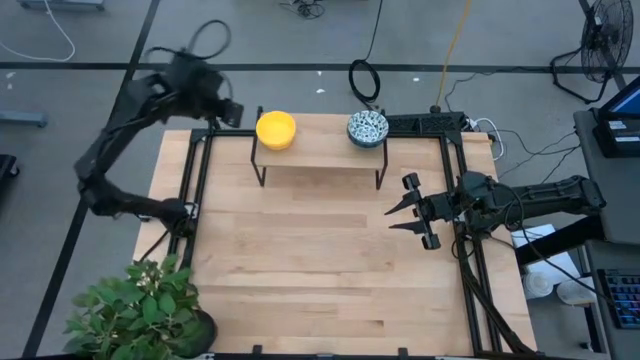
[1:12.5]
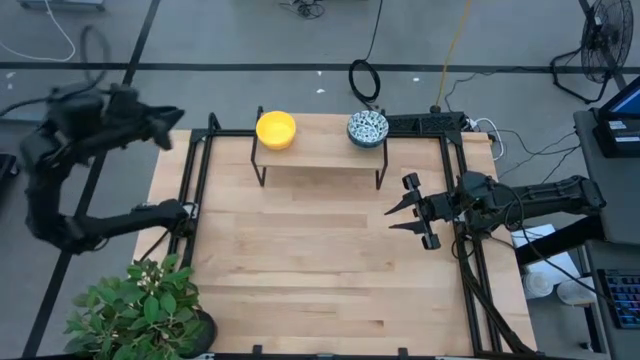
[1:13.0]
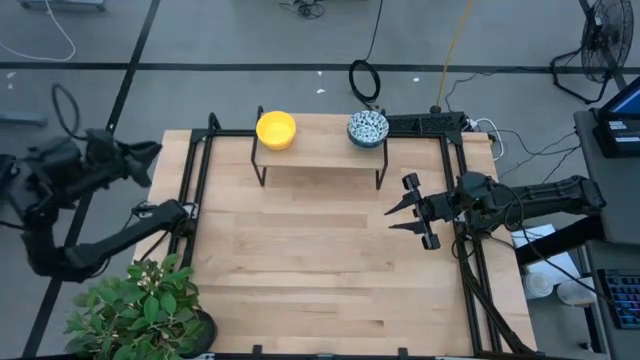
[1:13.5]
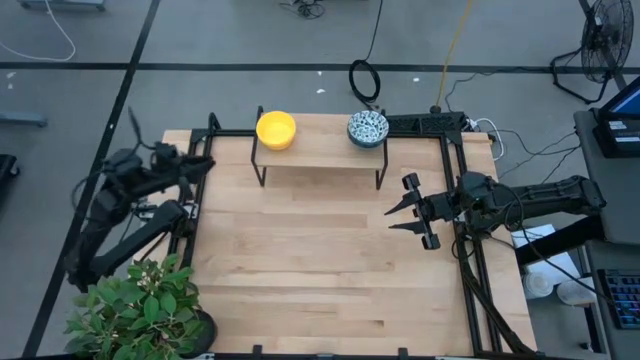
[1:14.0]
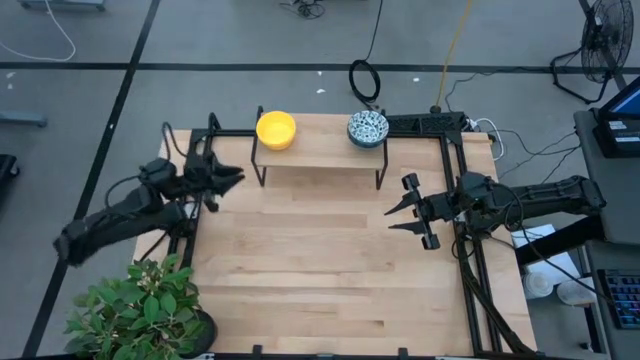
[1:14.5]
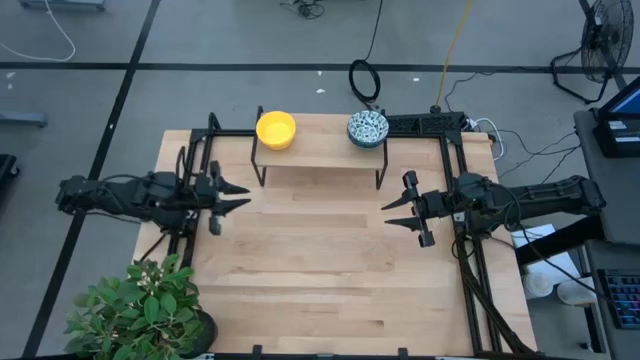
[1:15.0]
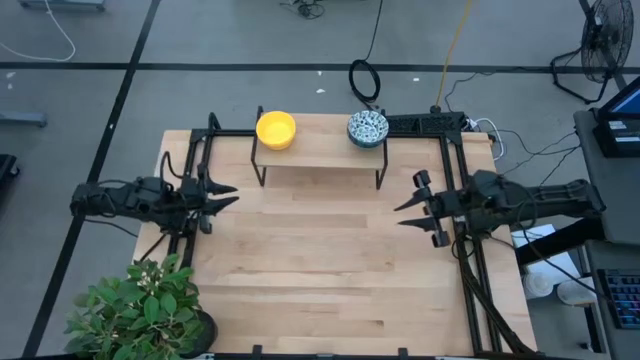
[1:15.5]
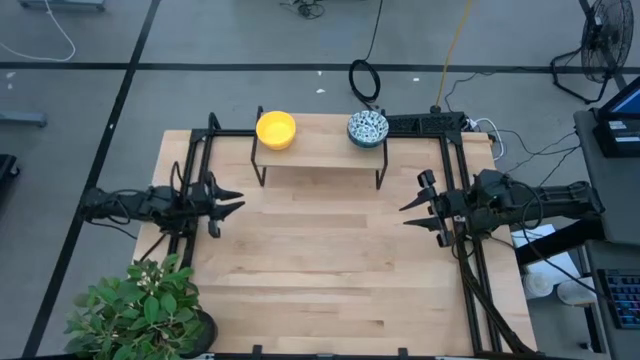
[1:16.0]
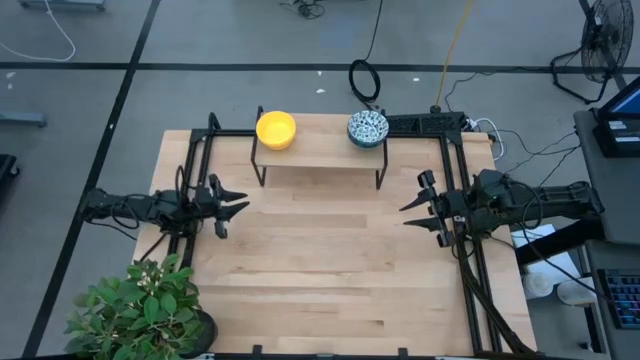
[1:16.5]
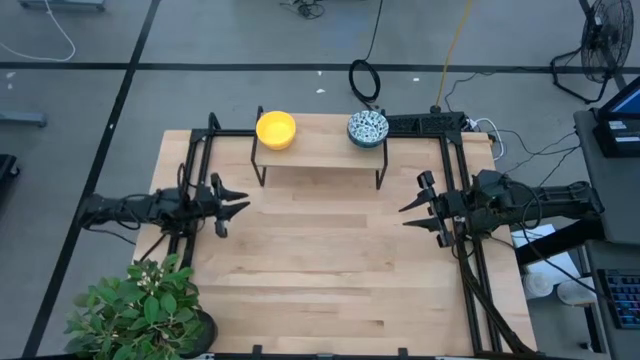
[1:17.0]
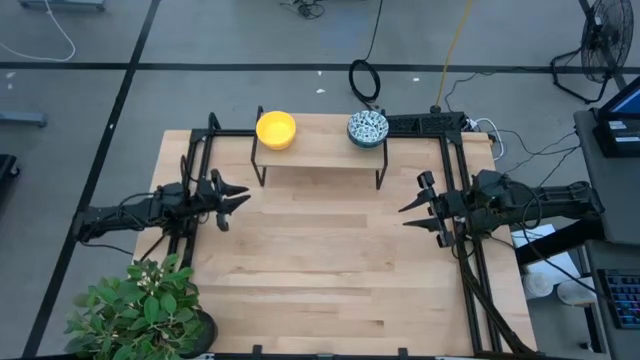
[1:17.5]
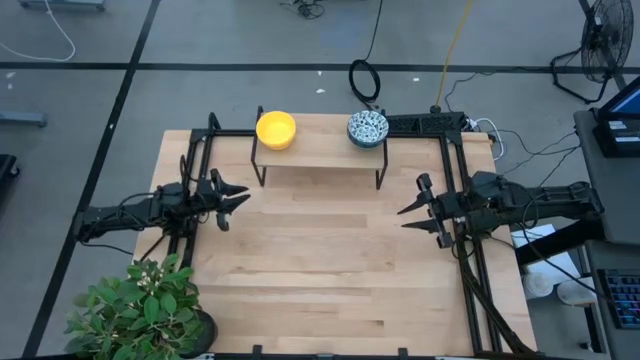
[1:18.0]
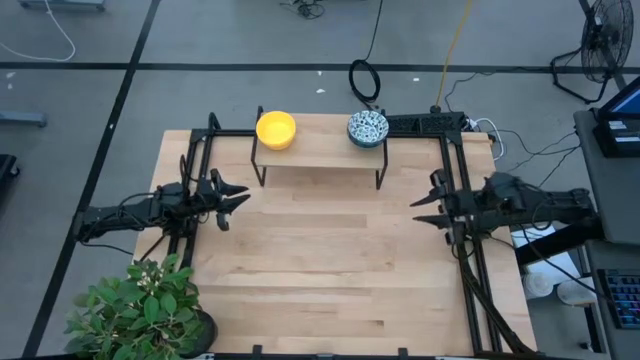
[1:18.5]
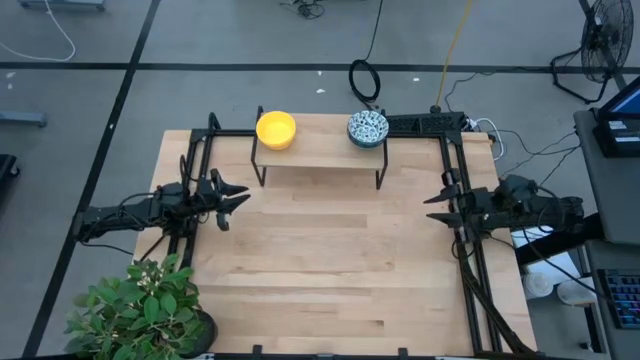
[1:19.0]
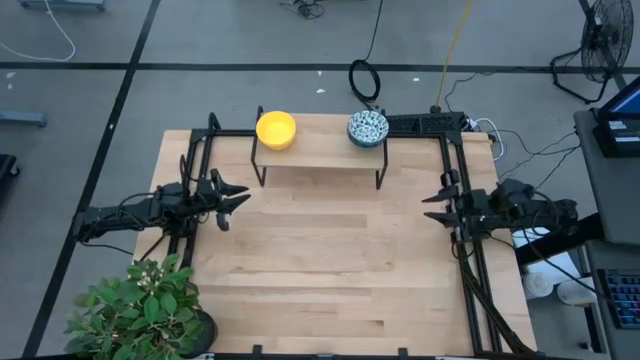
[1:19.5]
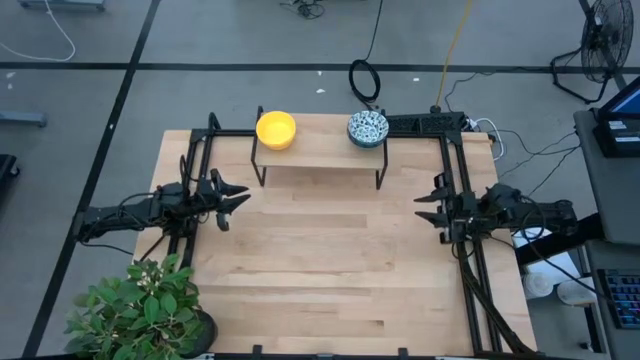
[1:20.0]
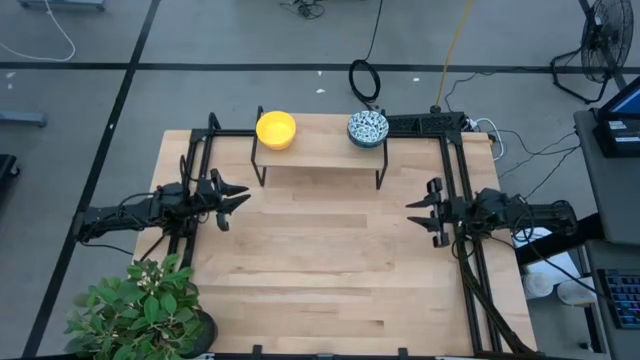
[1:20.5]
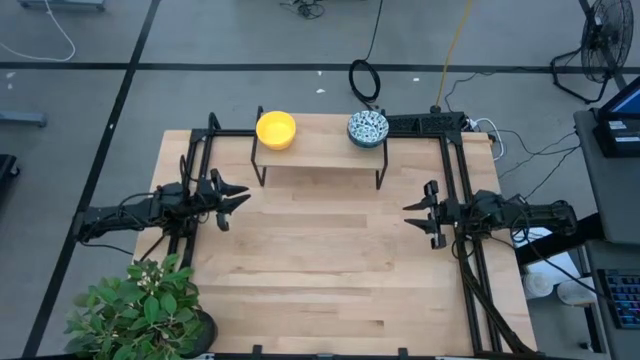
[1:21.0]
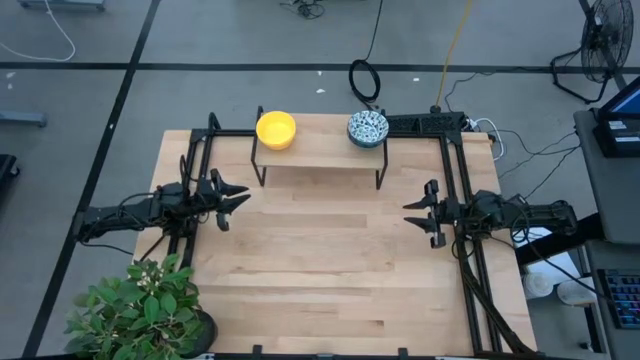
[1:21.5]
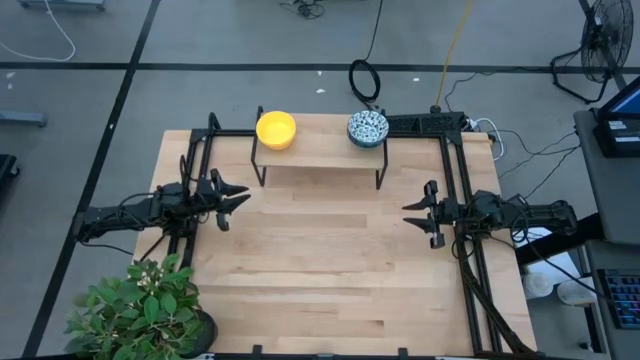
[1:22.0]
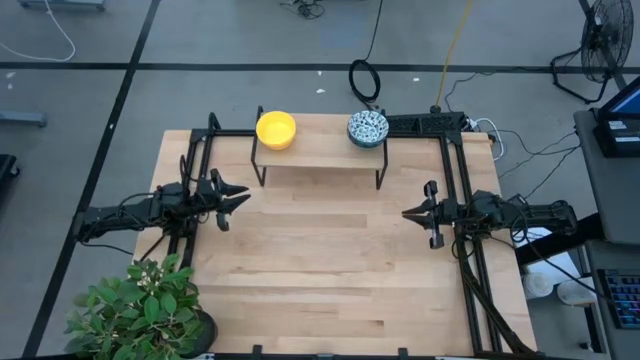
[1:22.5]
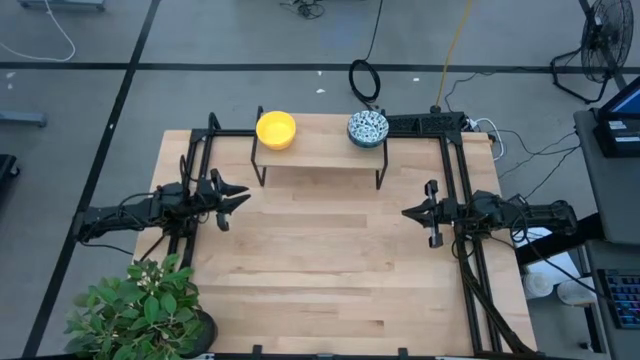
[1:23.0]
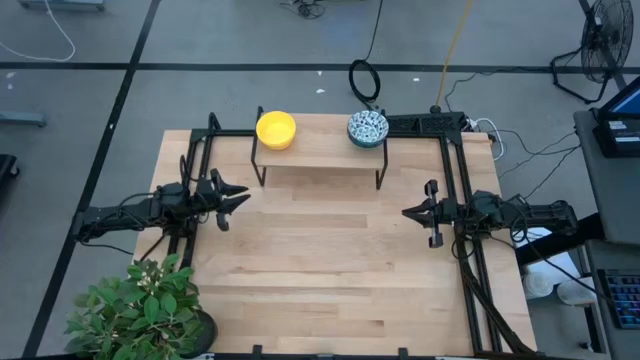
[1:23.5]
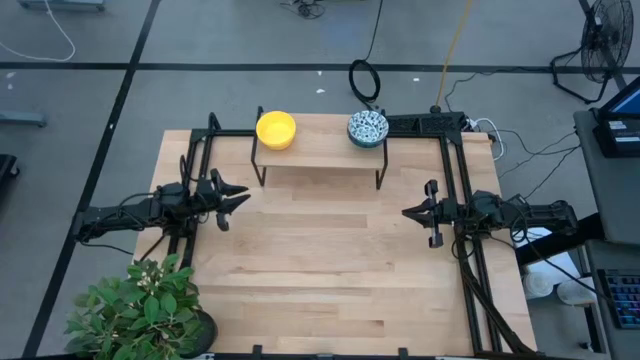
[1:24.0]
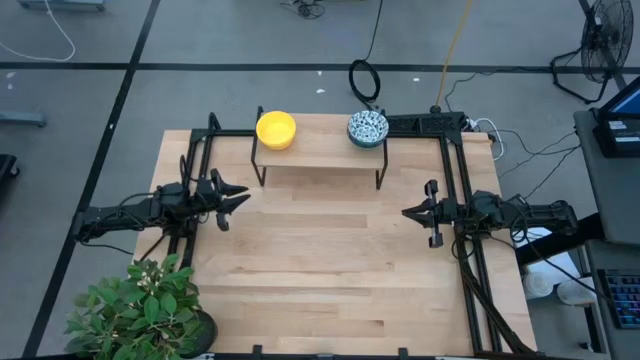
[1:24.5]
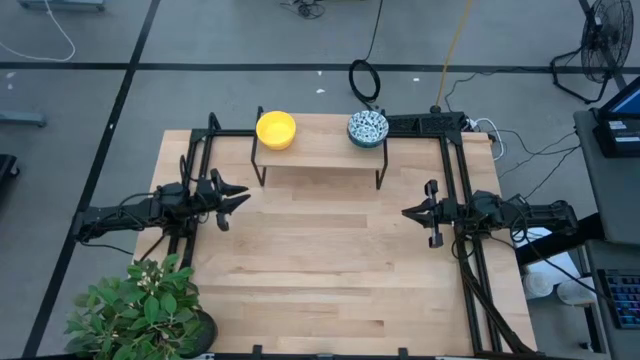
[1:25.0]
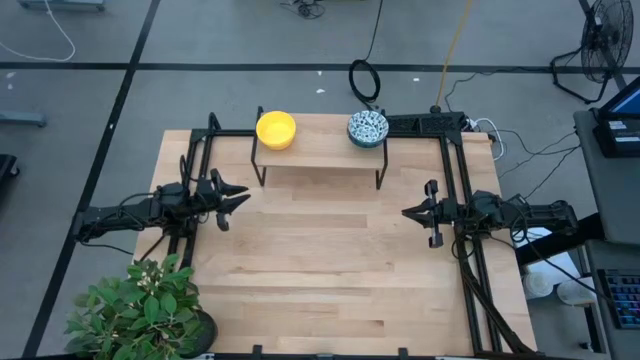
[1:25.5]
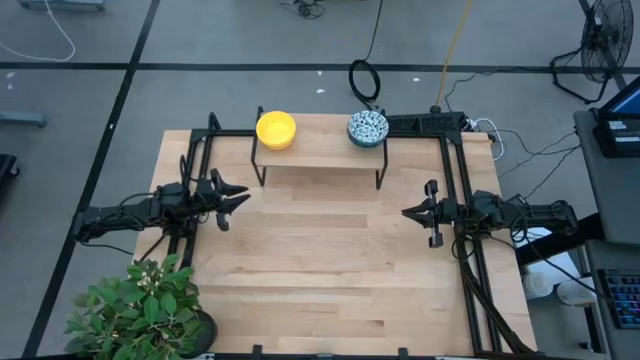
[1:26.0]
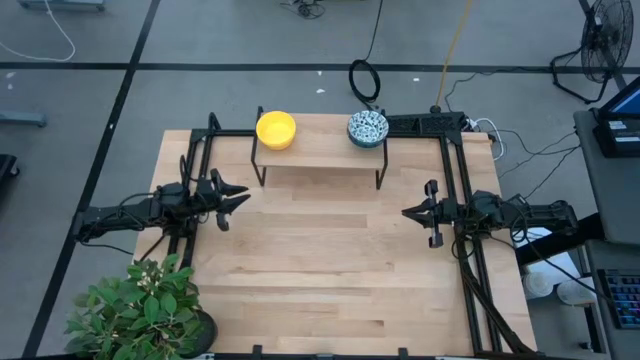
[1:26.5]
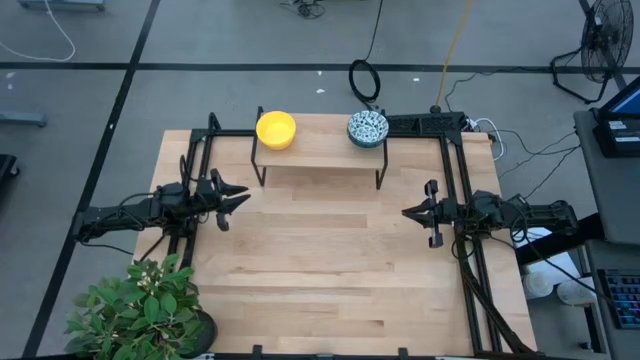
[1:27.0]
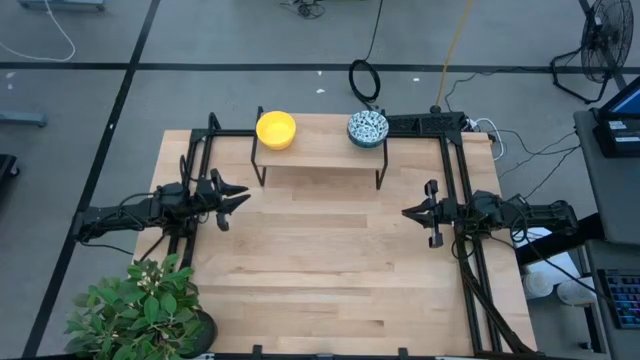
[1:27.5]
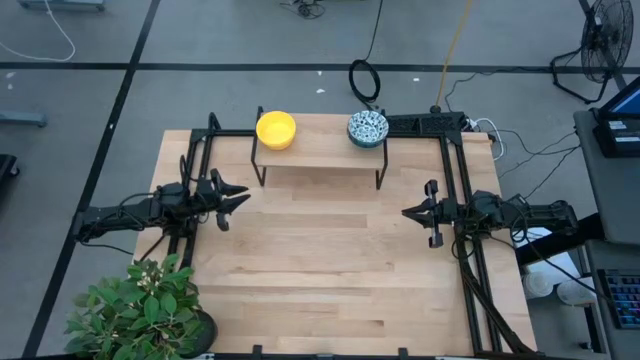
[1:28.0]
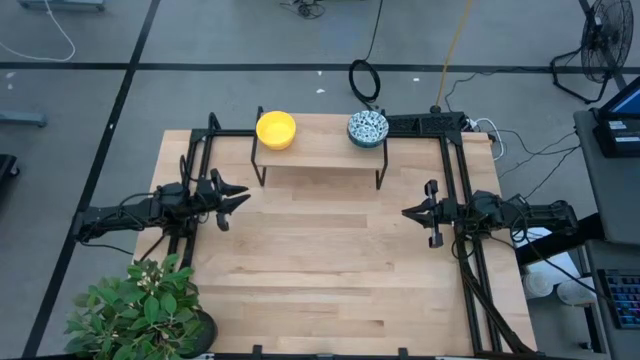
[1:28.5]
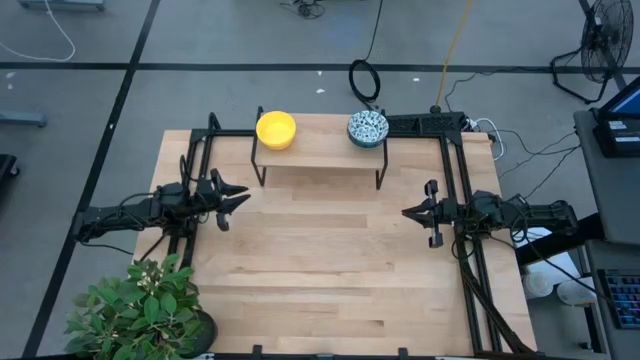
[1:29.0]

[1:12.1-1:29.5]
Task: Pick & Place Mini bowls
Return to Home Position

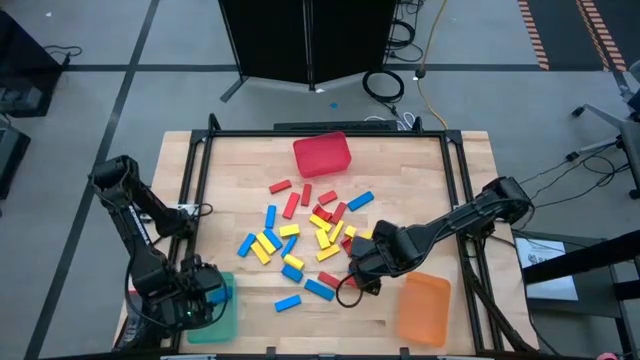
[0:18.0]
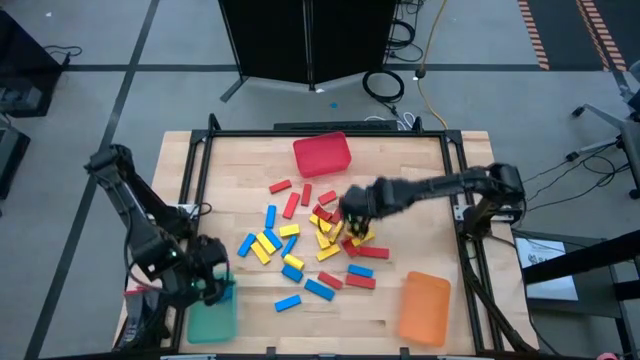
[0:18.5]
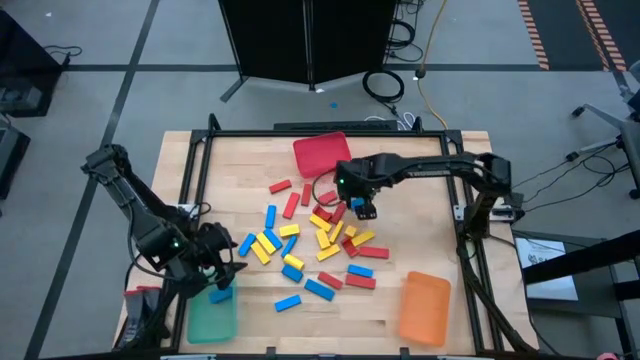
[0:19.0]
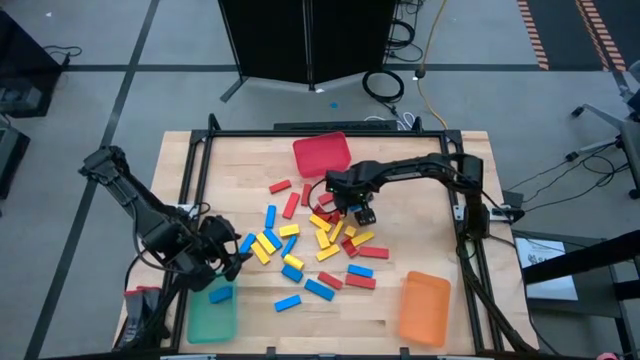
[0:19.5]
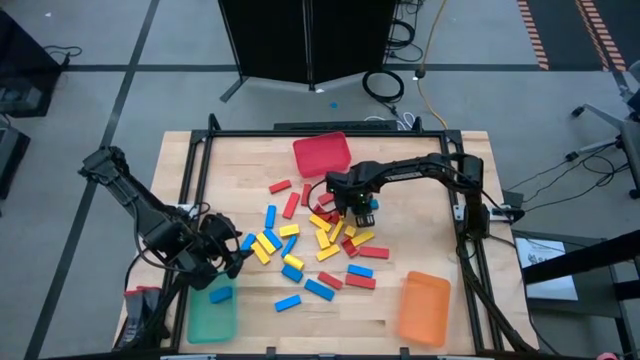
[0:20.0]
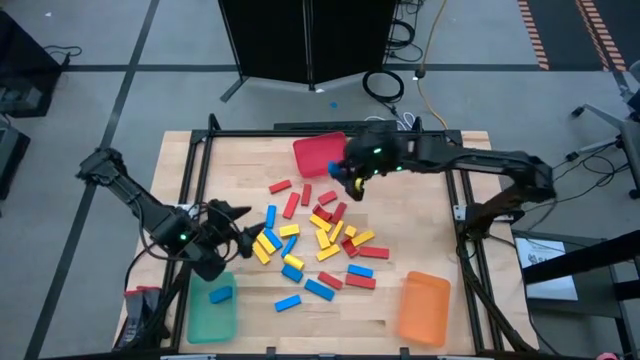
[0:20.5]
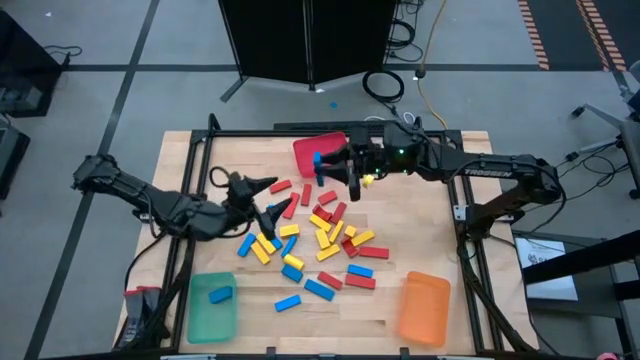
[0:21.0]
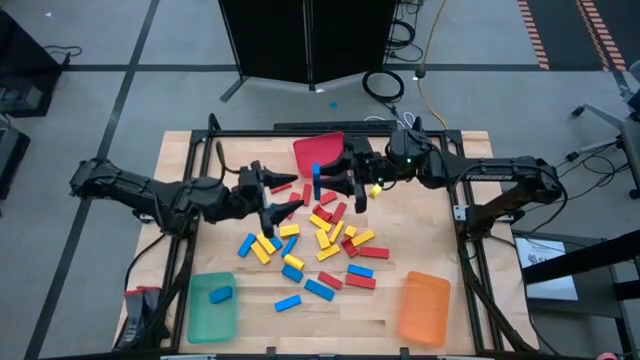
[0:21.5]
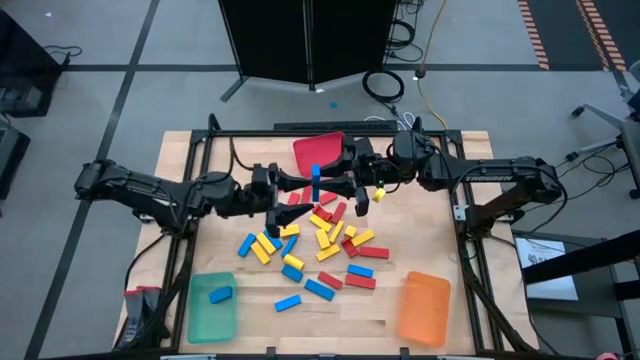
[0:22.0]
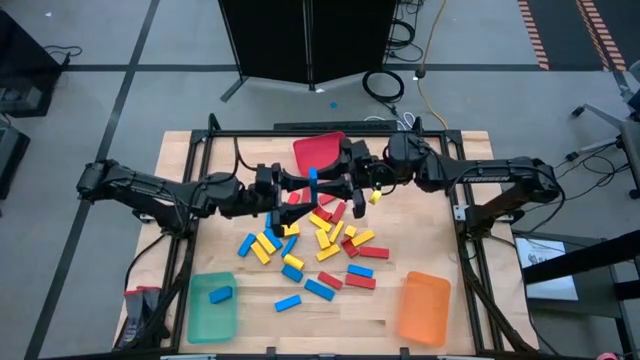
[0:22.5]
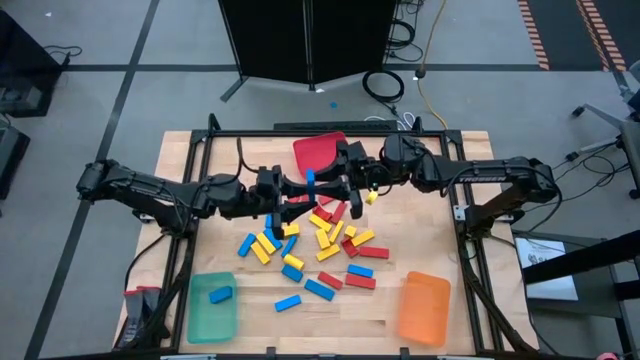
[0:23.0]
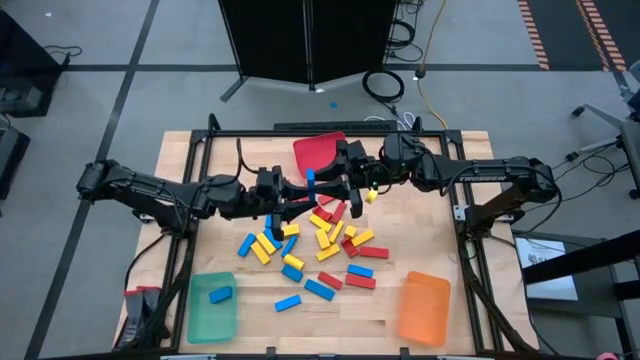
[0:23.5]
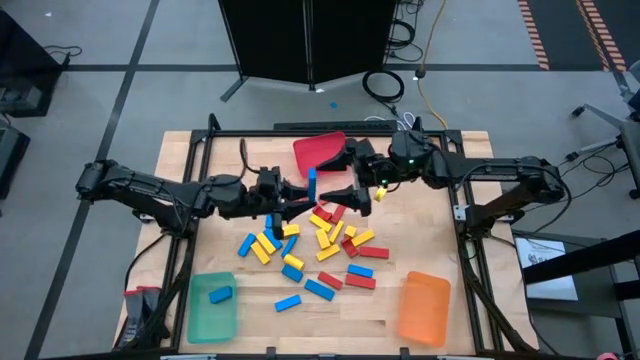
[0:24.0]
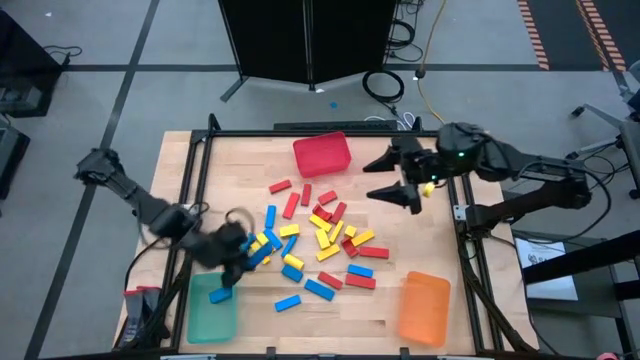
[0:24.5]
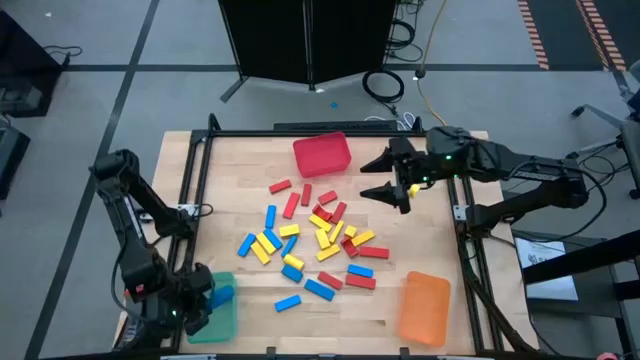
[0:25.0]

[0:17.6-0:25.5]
Task: Sort blocks
Put the blue block into the green bin
